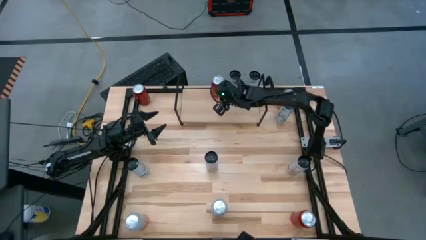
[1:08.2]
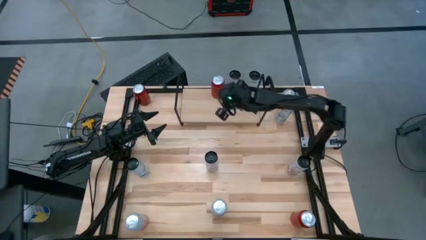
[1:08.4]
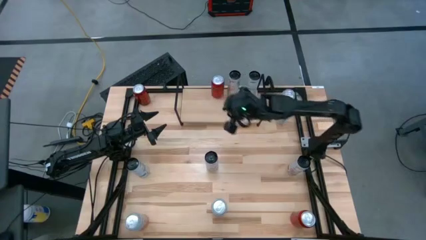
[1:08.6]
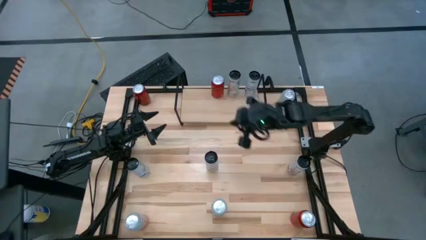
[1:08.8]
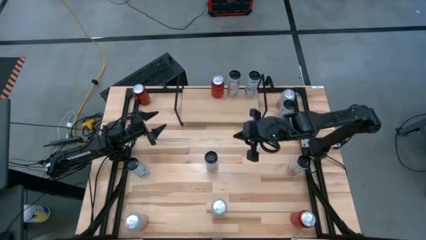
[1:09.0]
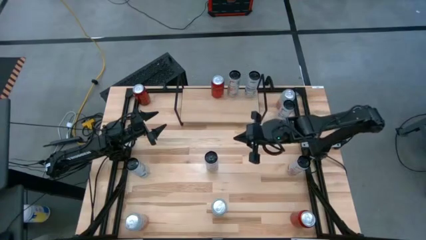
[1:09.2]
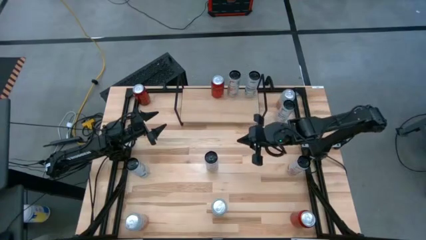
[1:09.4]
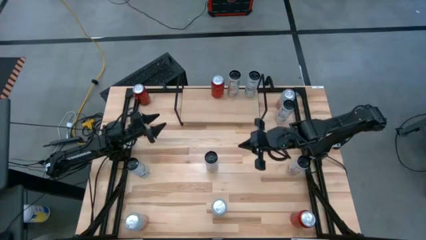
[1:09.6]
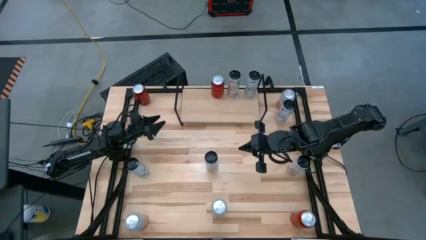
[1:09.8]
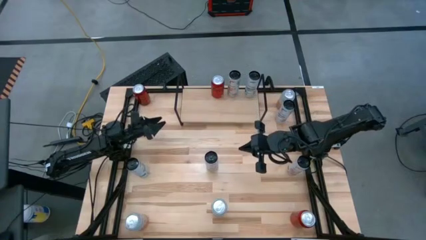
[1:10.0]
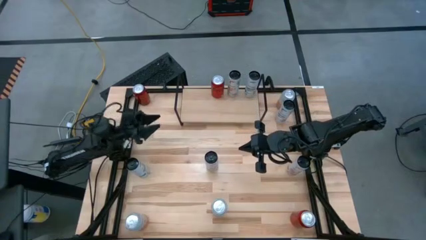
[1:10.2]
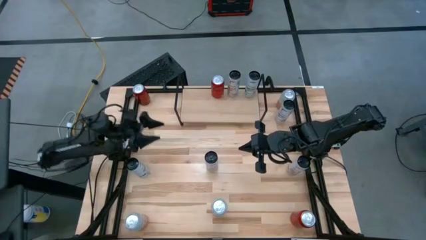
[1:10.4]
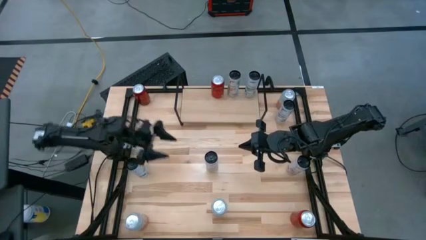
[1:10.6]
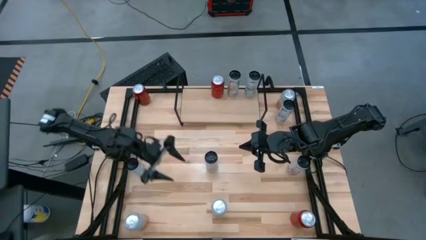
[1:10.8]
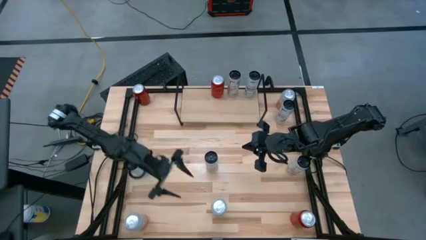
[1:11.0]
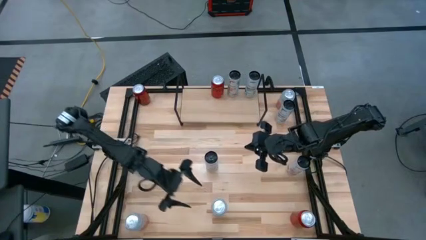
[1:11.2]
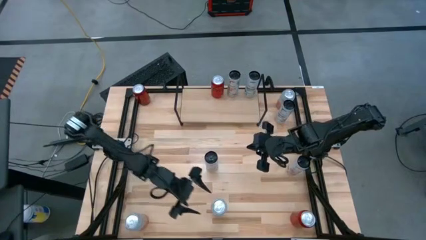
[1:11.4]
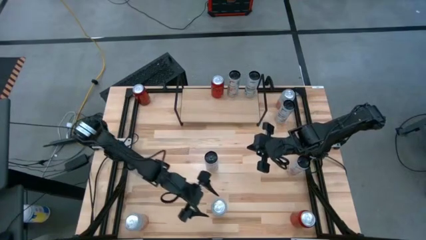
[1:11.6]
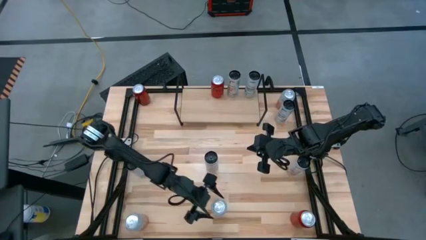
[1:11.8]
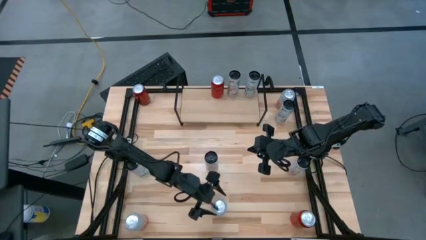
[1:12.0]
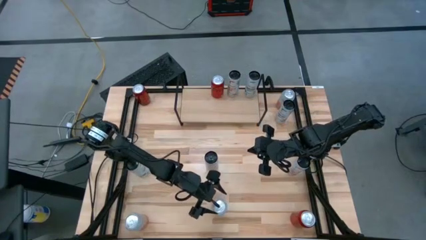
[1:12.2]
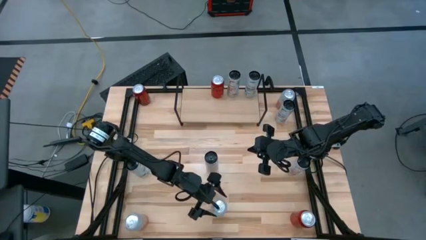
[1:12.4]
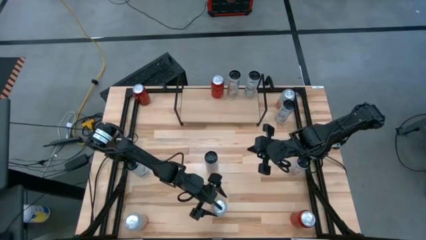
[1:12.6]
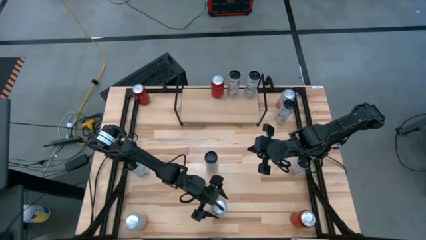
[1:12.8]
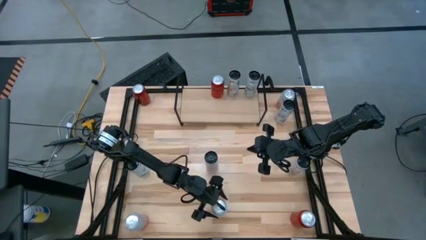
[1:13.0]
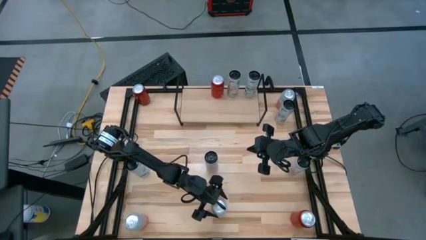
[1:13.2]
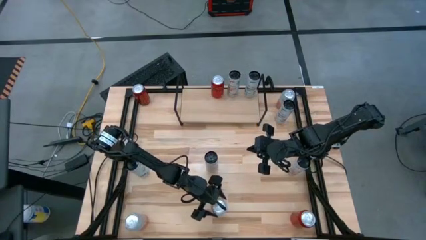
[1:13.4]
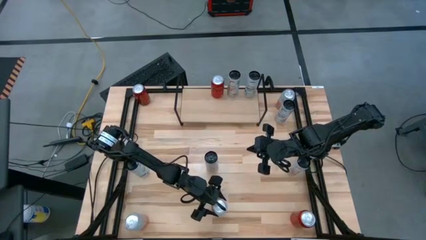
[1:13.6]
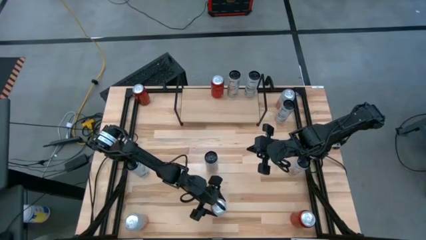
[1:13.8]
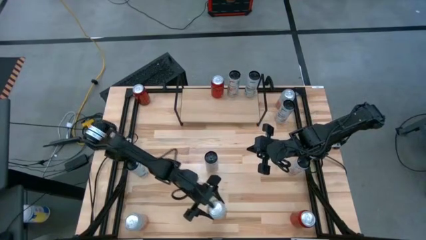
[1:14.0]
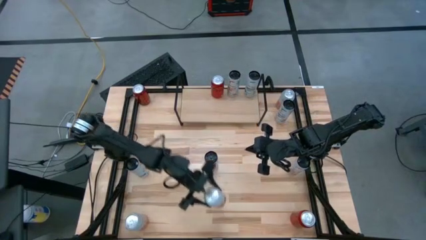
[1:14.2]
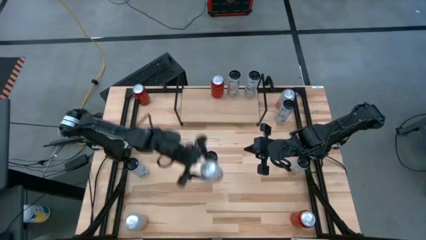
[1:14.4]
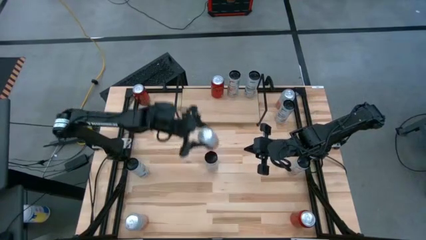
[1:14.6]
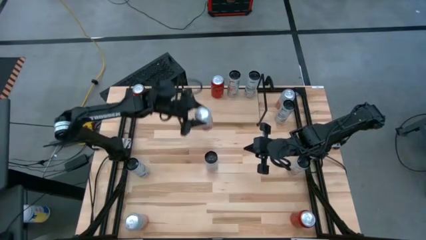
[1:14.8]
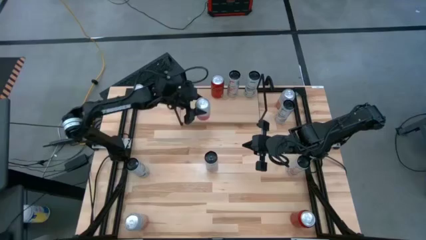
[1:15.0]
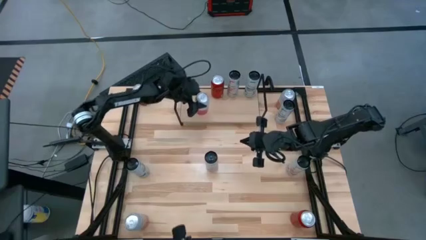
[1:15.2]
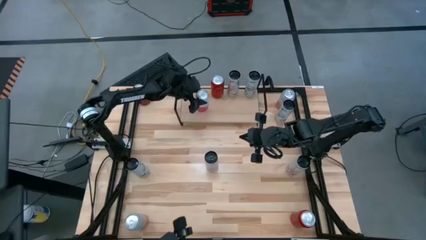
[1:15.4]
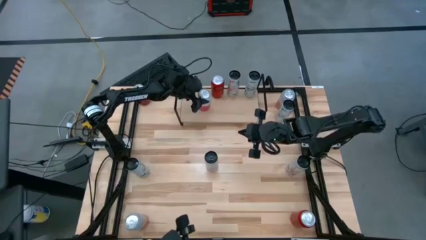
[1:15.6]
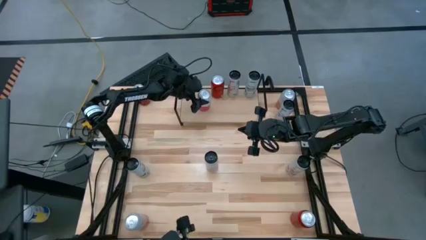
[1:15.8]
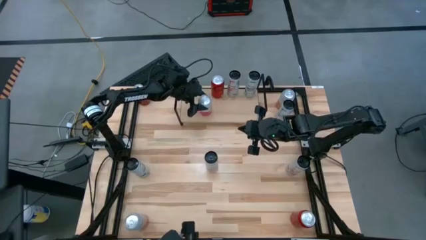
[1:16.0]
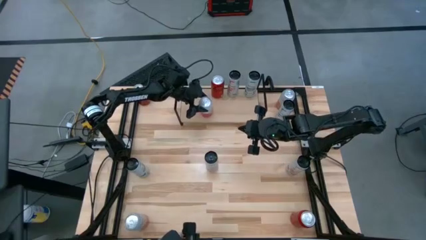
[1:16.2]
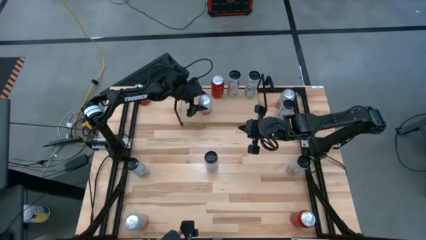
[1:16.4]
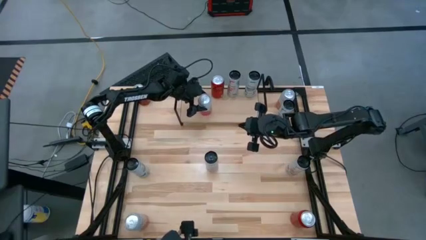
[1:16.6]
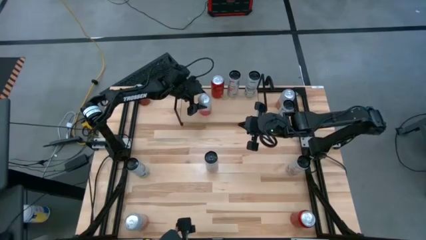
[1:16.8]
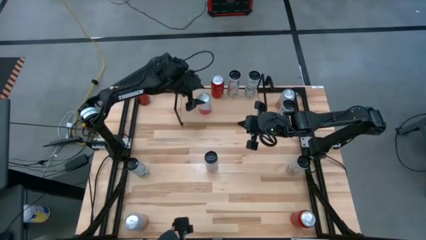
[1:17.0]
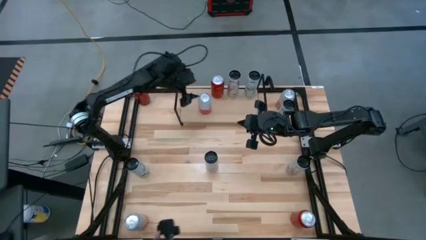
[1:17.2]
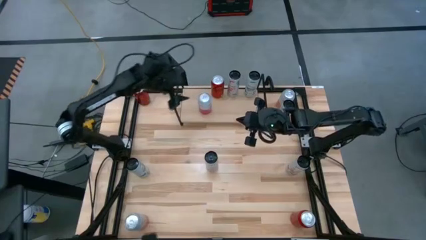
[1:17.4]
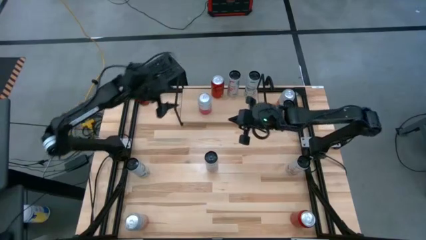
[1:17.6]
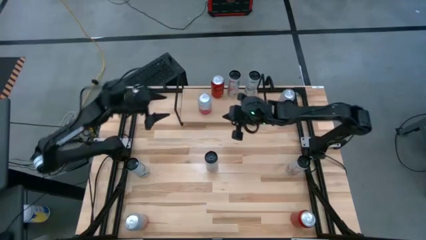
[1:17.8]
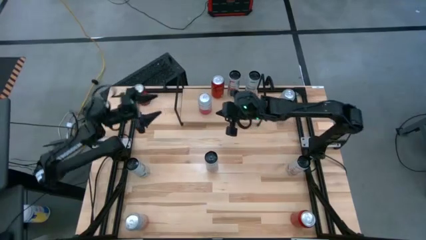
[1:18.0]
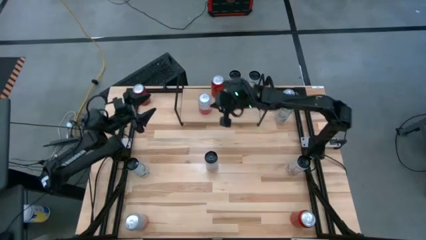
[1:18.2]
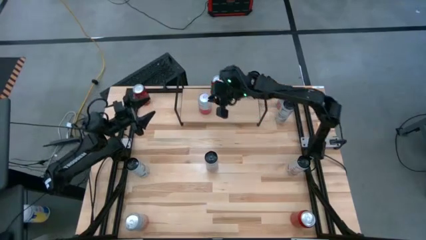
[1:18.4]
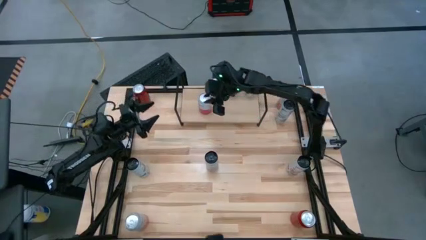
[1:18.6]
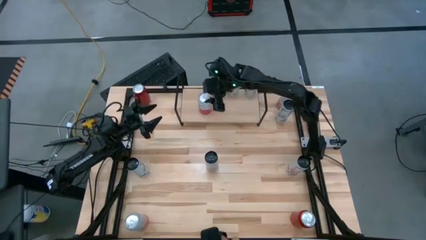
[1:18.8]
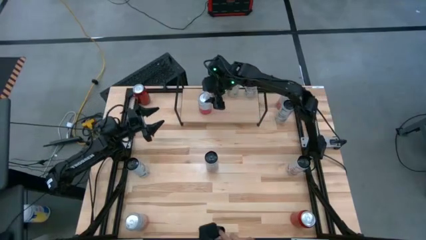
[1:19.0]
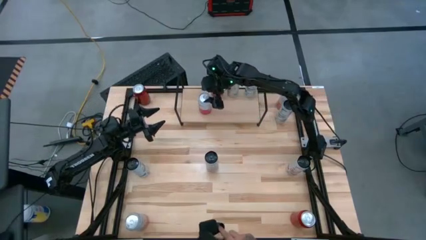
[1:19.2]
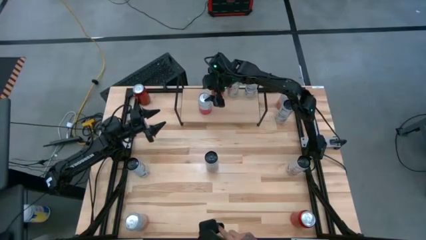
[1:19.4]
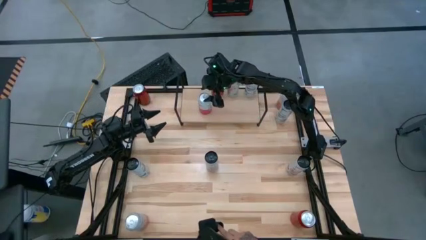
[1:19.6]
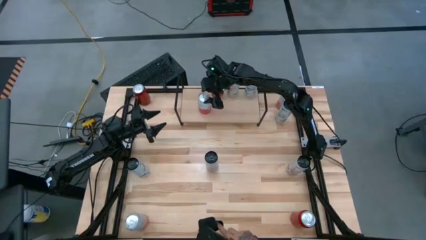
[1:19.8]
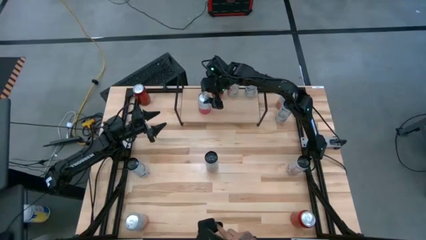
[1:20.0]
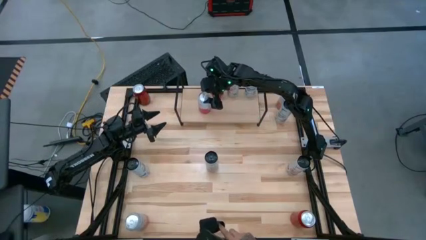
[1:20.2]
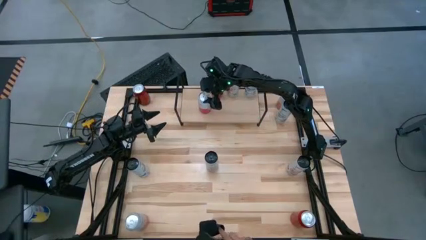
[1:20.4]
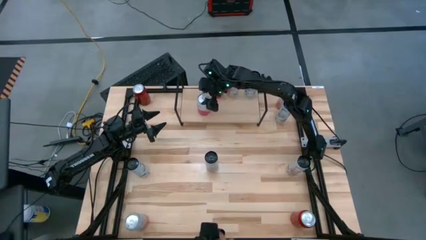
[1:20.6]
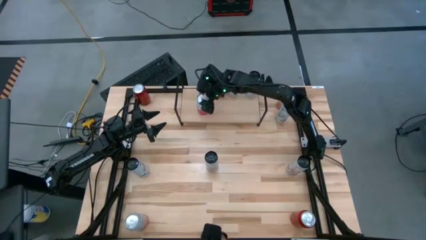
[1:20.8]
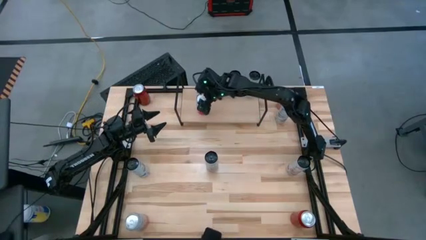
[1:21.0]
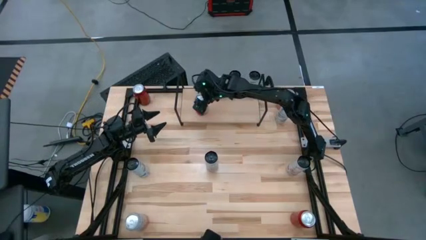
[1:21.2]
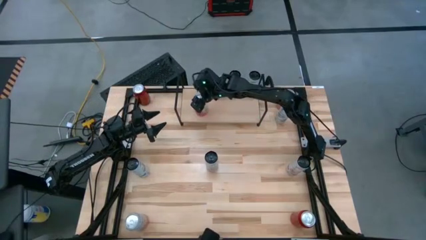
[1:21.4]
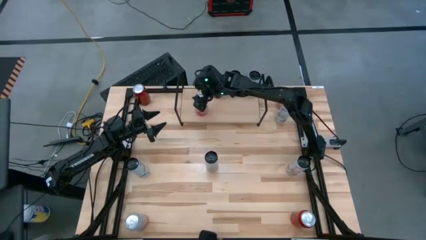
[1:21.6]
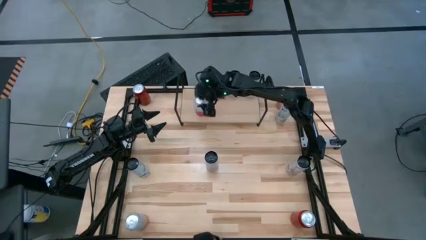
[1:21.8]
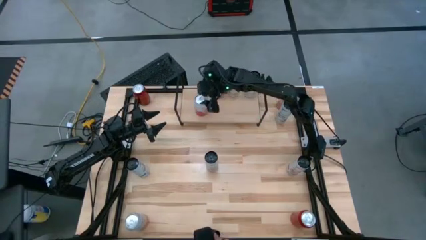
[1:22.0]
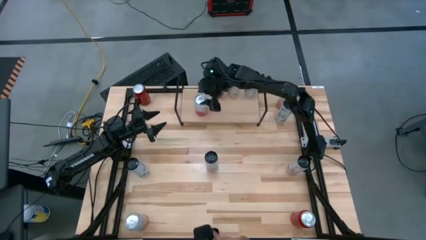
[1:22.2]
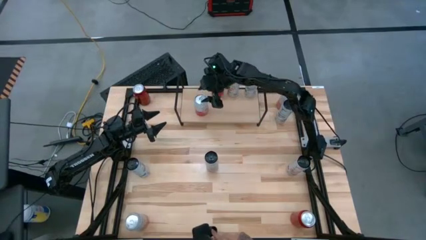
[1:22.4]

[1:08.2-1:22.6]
Task: Place canned beverage on shelf
Put the pink white soda can on the shelf

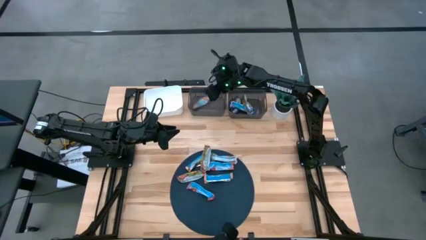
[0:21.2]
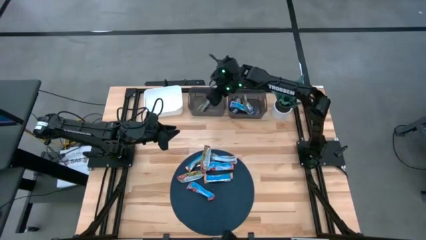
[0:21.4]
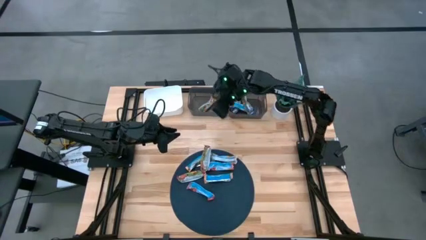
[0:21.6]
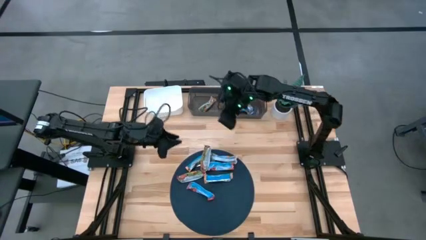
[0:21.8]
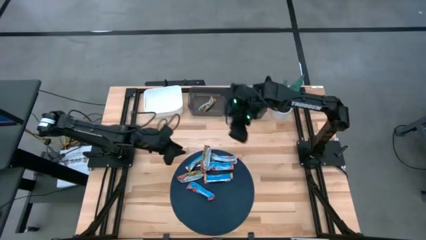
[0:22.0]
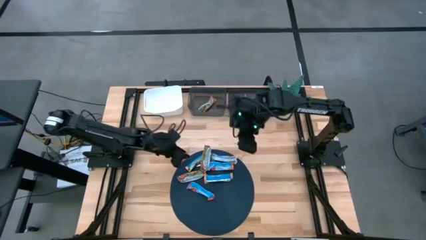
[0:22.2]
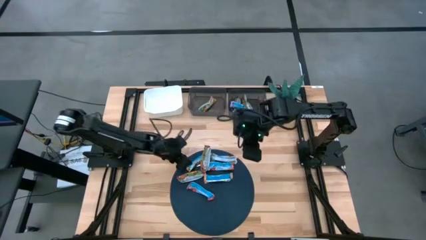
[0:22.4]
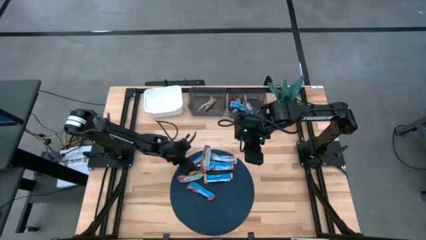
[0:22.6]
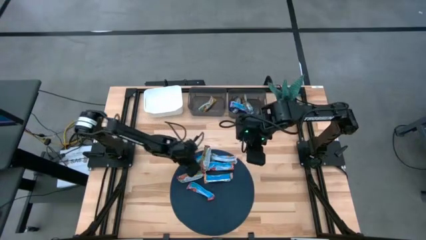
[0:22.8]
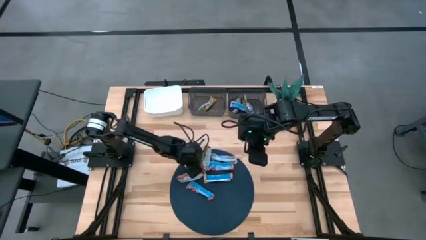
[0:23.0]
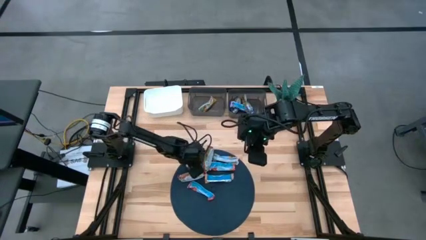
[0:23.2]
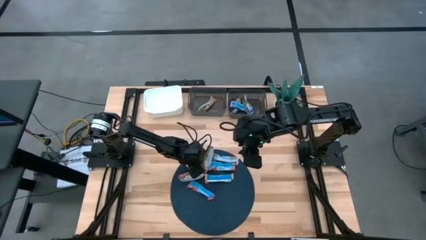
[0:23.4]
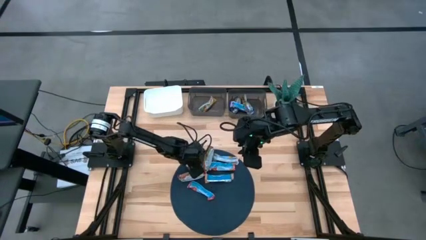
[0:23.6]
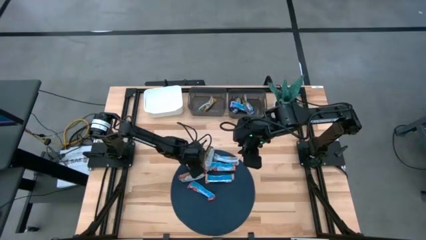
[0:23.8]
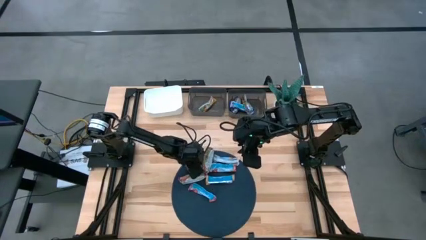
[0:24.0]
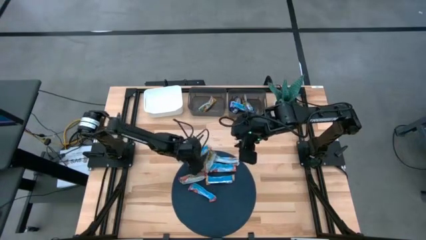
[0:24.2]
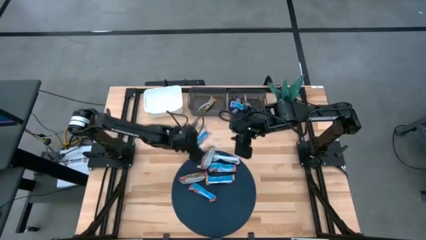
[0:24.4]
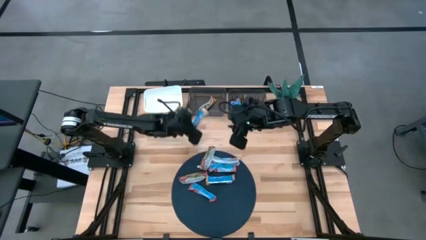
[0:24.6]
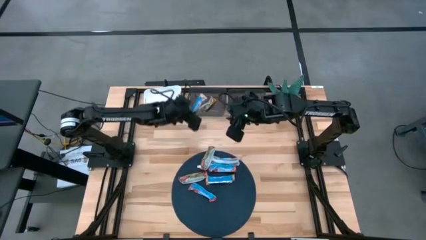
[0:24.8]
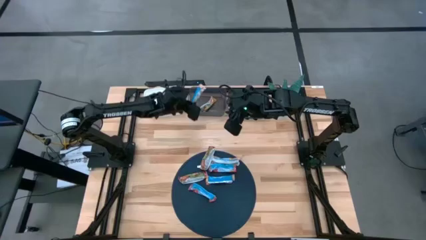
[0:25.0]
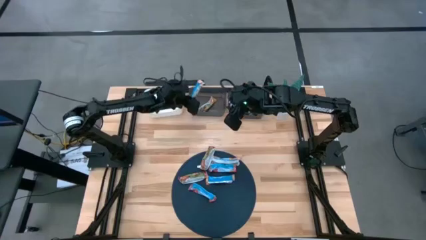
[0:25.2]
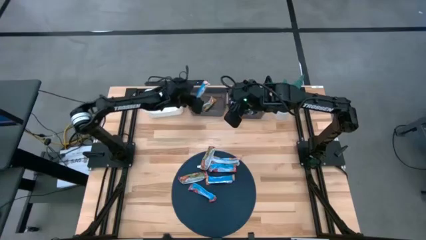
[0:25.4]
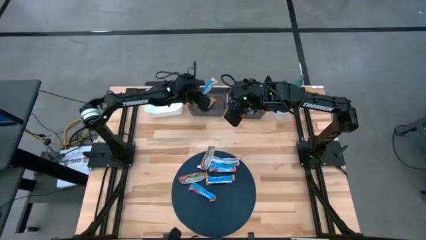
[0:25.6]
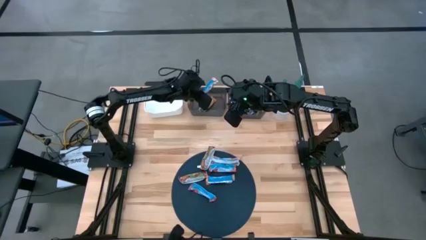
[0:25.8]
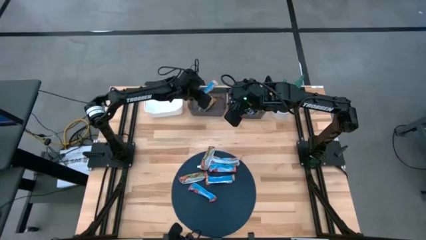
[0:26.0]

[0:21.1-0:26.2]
Task: Pick and place Granola Bars by type
Put the orange granola bar into the left black transparent bin
